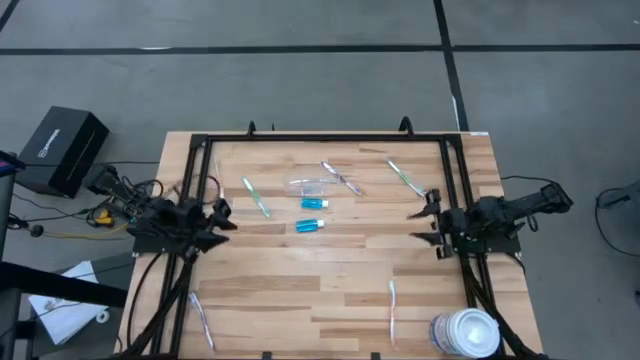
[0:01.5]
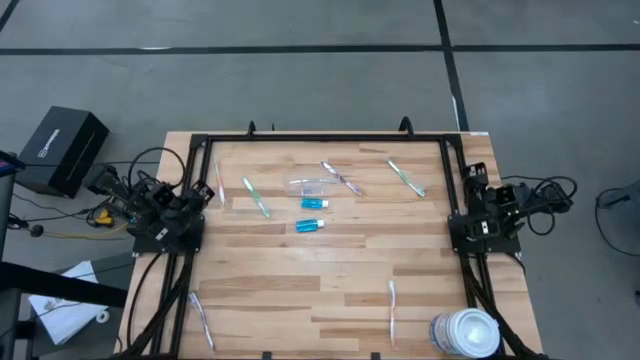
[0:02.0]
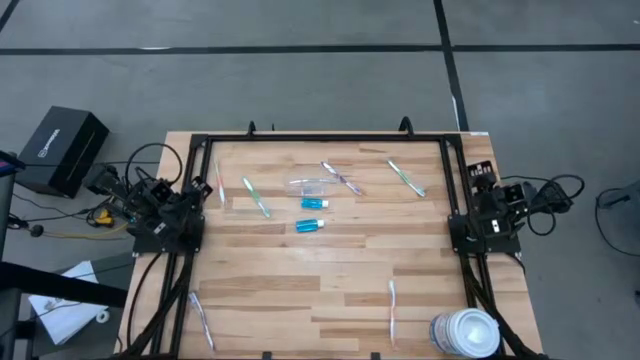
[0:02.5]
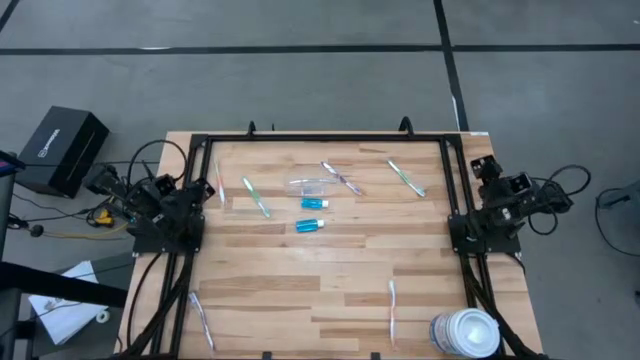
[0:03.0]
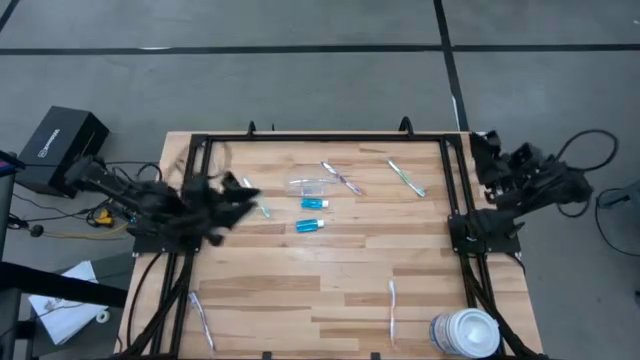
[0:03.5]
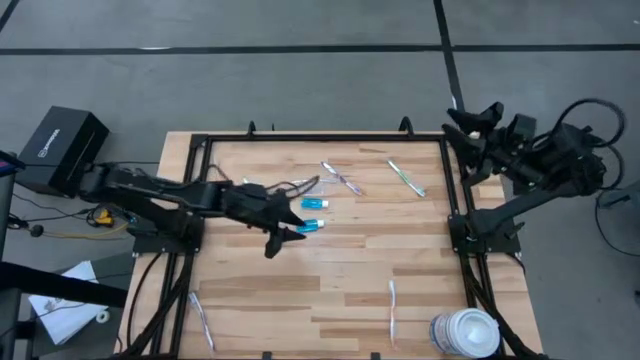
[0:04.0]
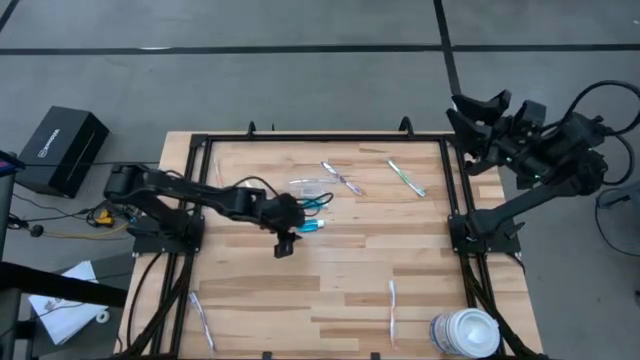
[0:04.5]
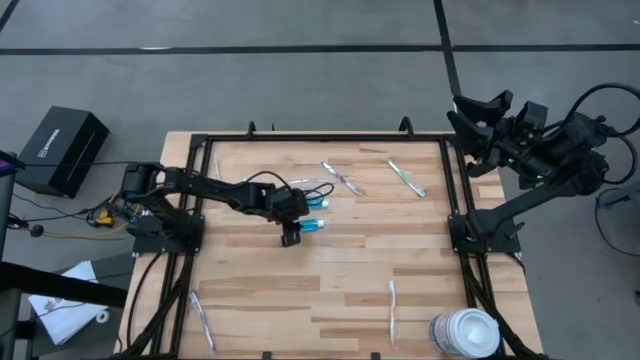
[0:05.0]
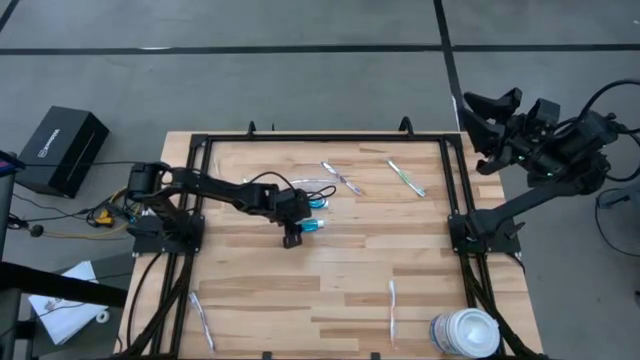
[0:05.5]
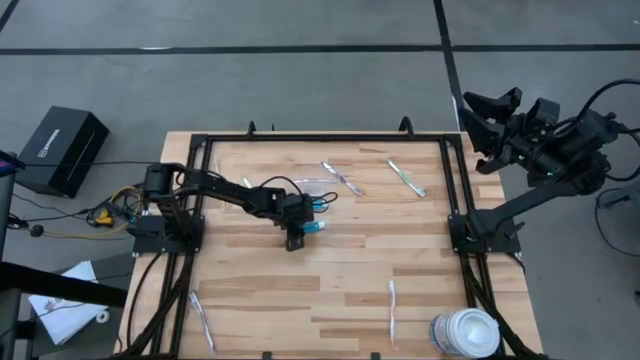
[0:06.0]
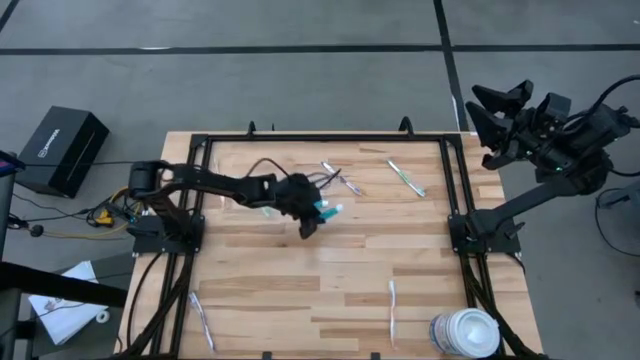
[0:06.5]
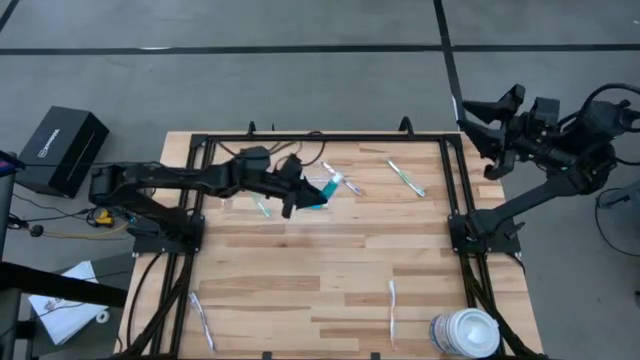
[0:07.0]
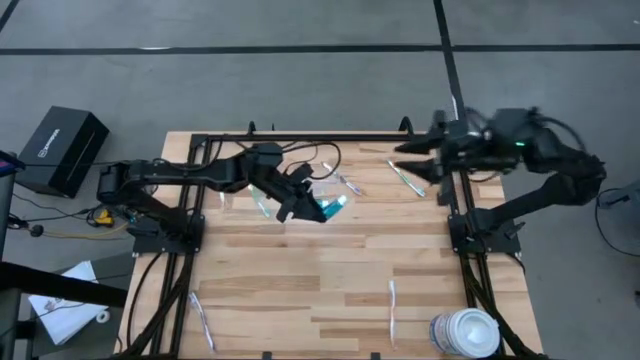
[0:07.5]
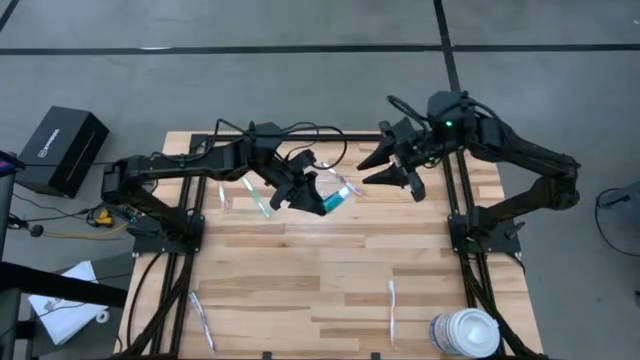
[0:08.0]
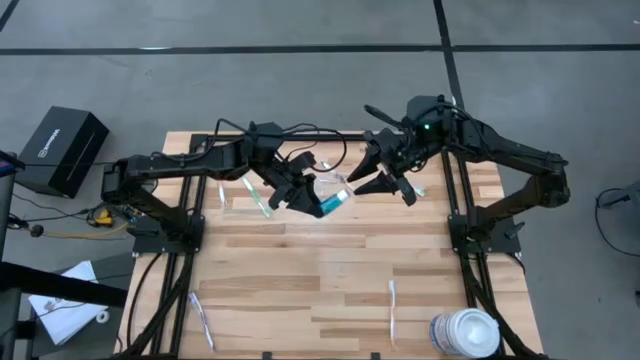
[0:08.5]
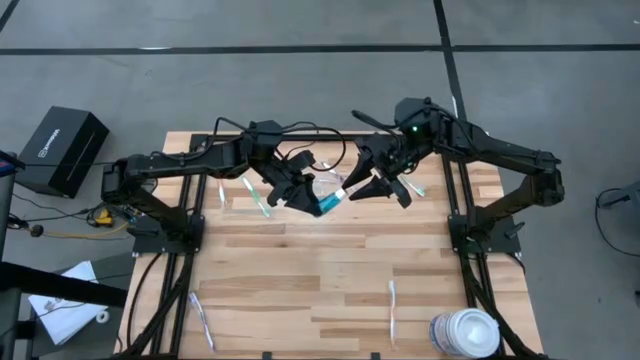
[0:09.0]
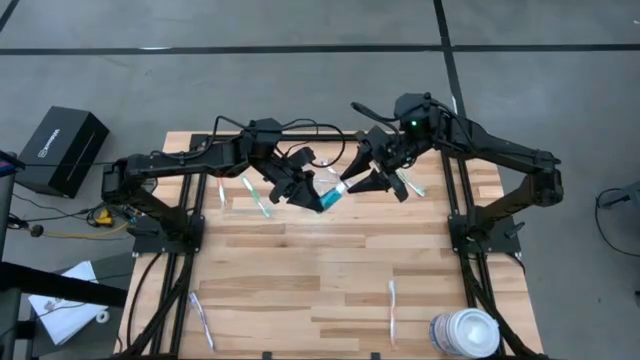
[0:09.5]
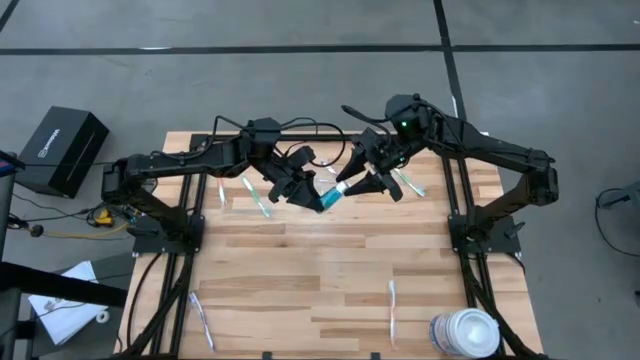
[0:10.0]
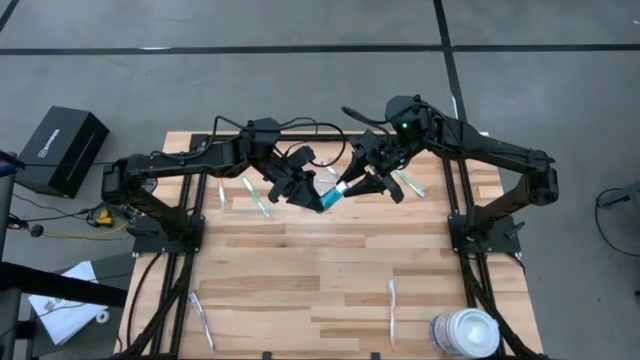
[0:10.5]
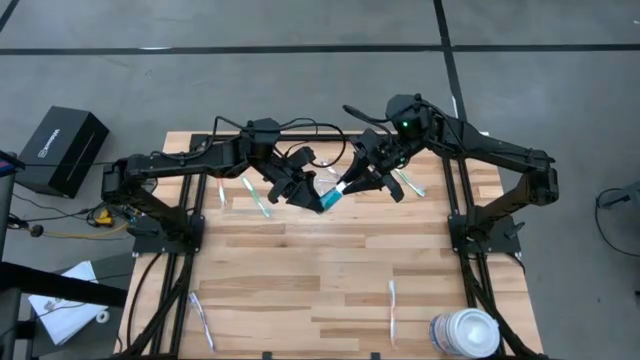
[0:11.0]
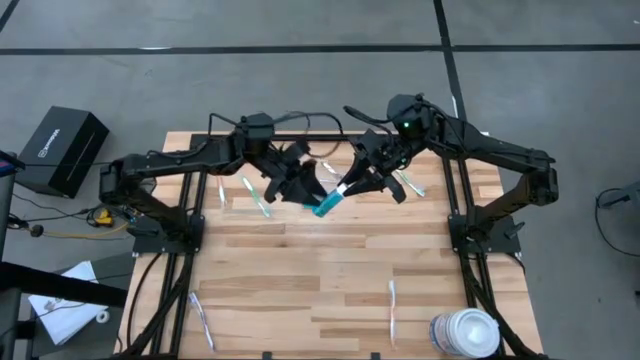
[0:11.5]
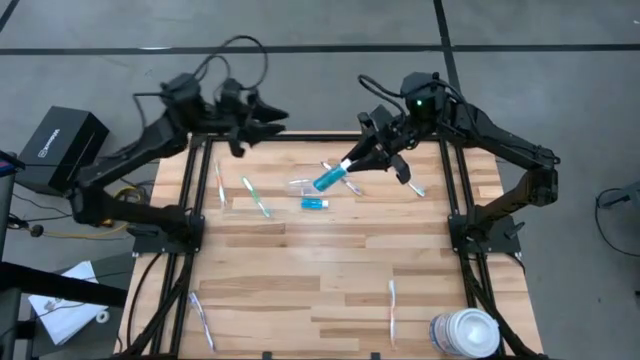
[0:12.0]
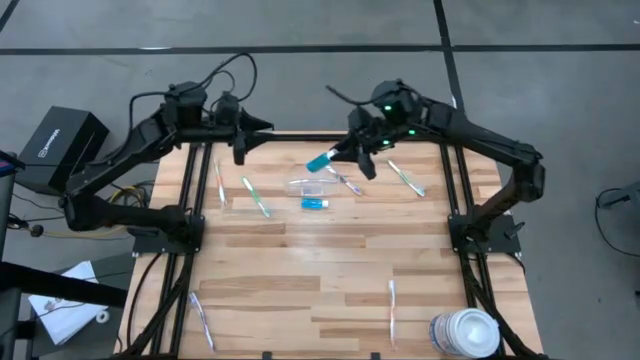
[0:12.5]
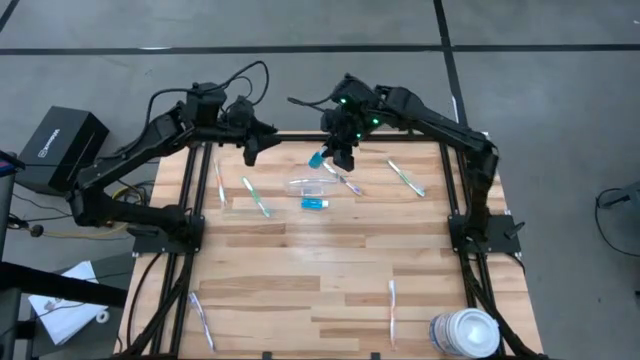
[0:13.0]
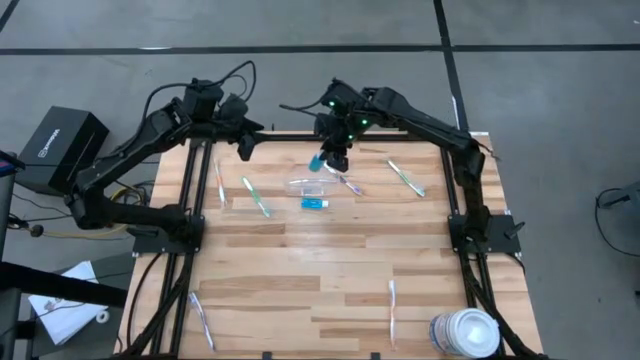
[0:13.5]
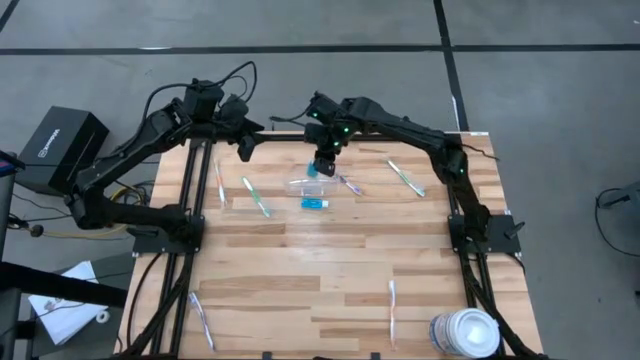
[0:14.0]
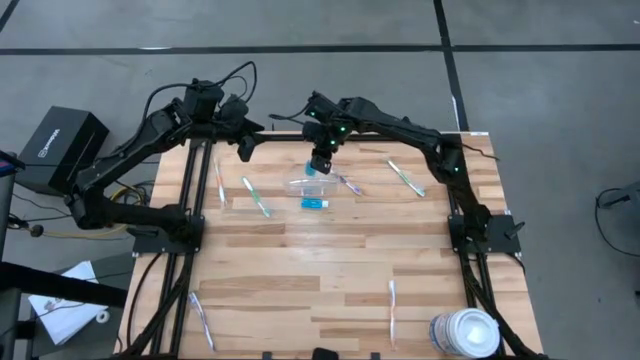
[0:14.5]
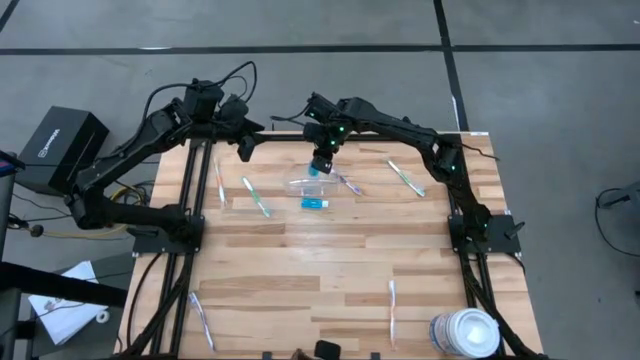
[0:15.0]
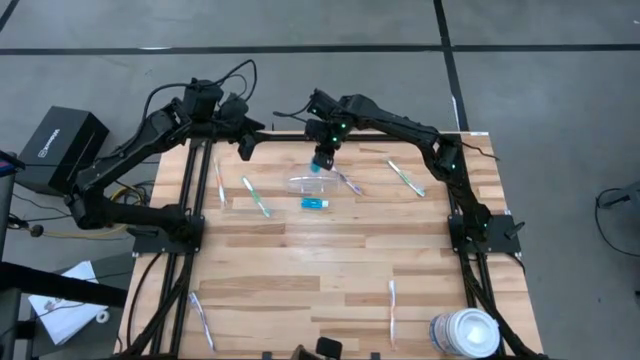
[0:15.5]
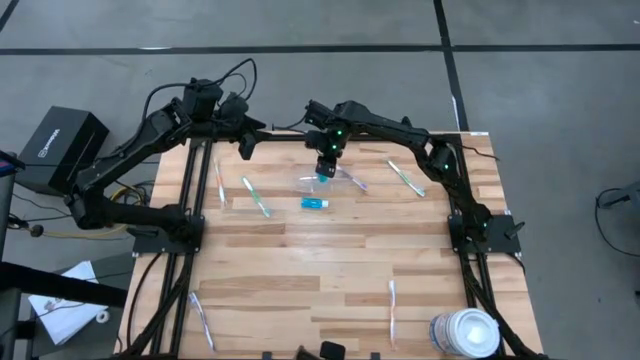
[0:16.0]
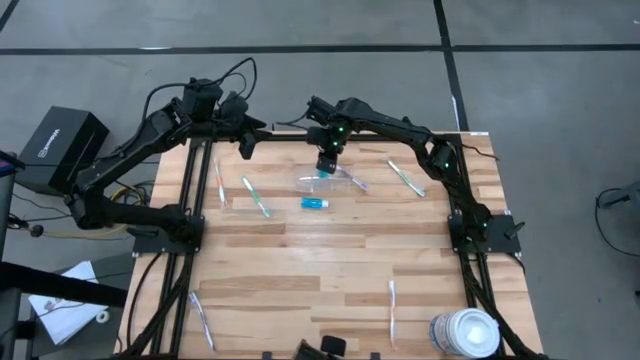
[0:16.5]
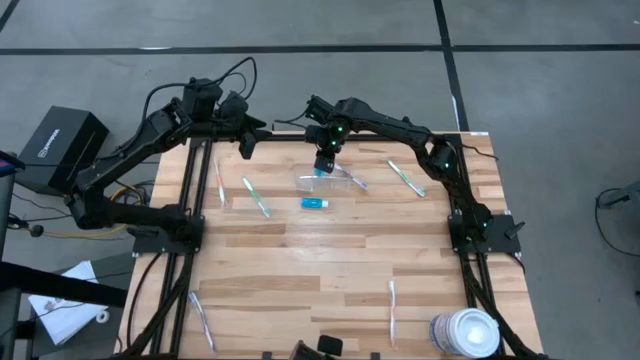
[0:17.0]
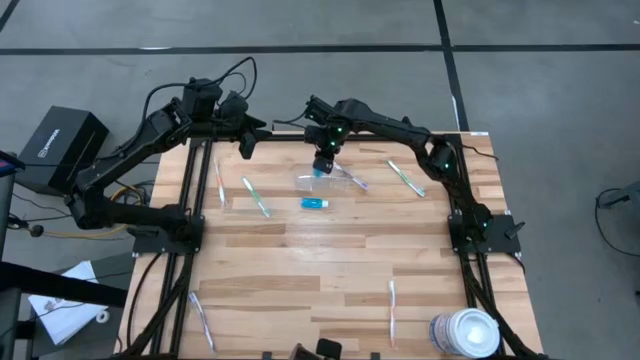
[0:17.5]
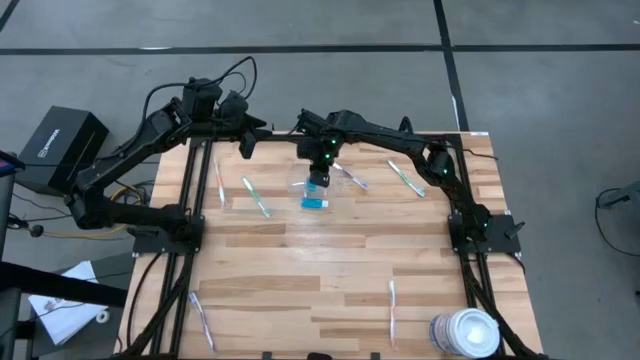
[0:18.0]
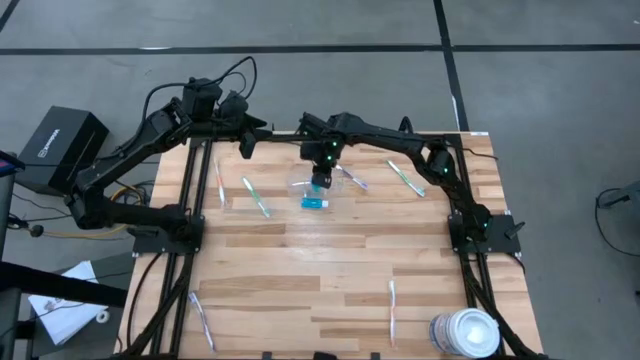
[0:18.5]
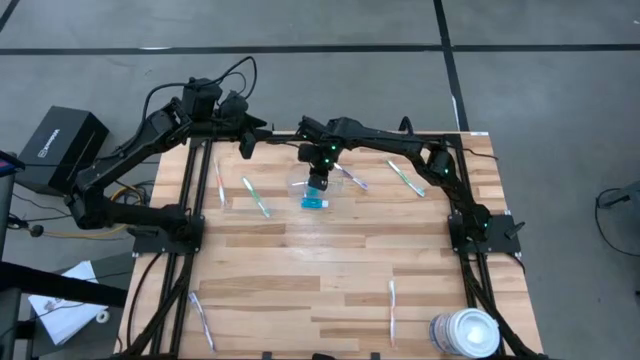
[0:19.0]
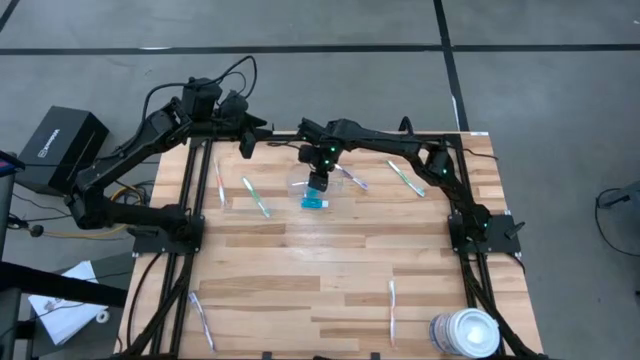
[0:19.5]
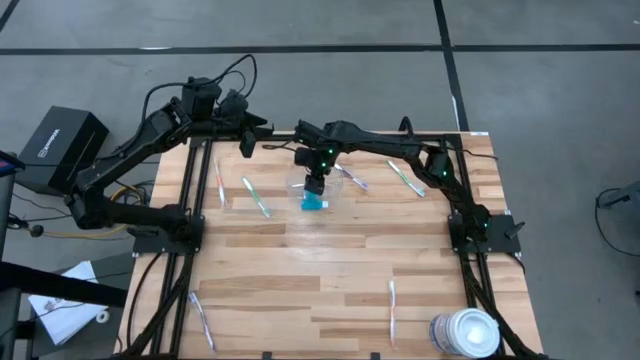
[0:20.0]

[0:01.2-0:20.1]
Task: Pick & Place toothbrushing station
Put the bottom blue mouthwash into the transparent organizer
